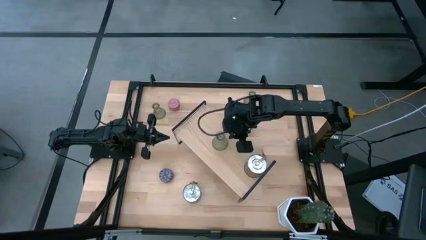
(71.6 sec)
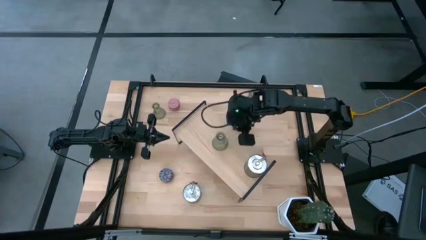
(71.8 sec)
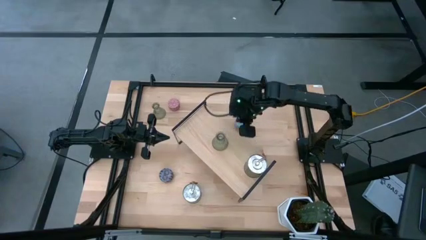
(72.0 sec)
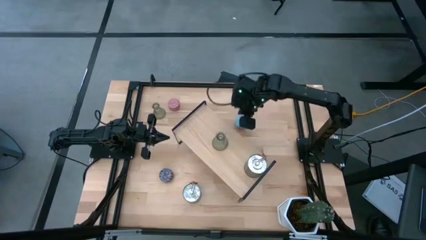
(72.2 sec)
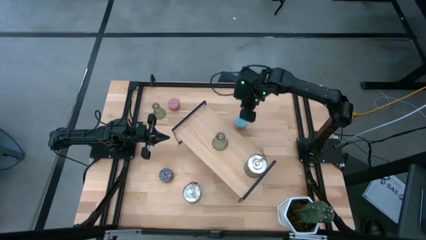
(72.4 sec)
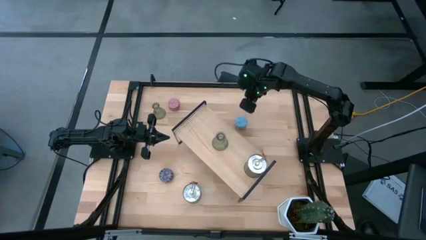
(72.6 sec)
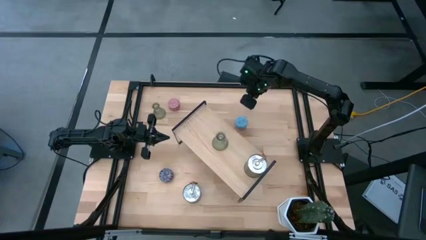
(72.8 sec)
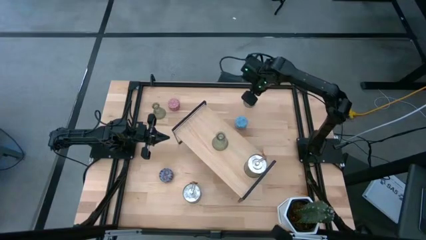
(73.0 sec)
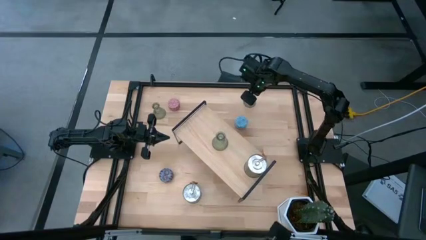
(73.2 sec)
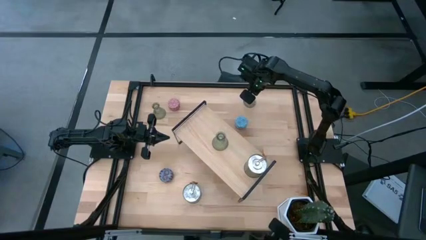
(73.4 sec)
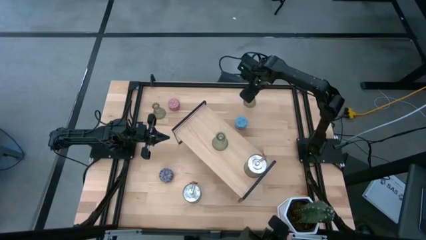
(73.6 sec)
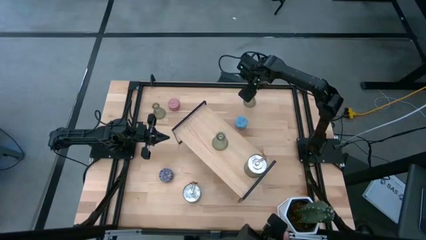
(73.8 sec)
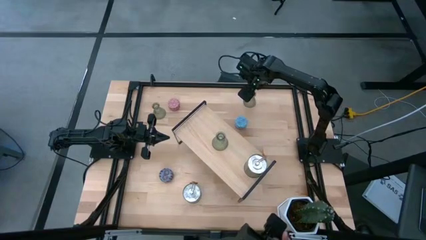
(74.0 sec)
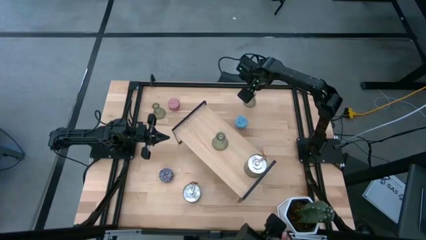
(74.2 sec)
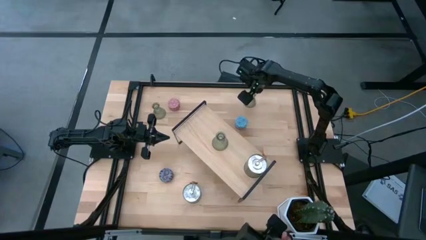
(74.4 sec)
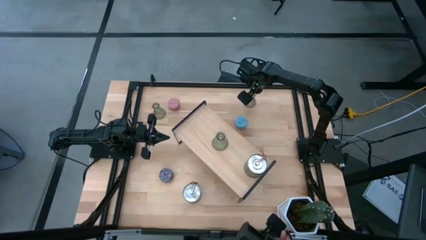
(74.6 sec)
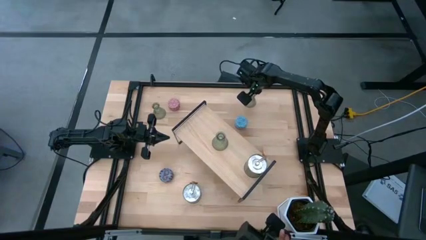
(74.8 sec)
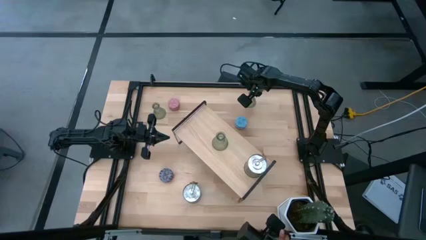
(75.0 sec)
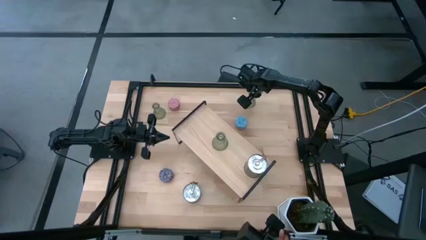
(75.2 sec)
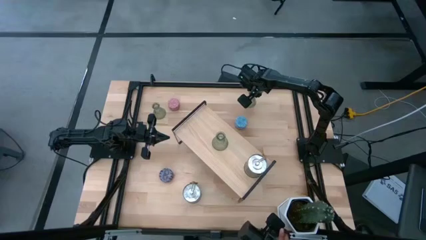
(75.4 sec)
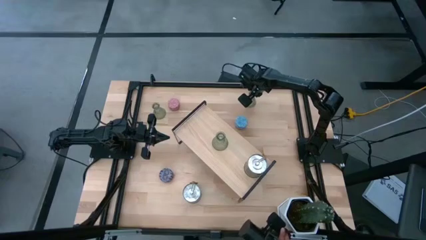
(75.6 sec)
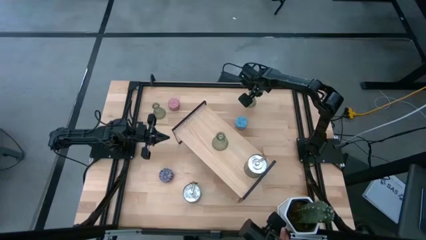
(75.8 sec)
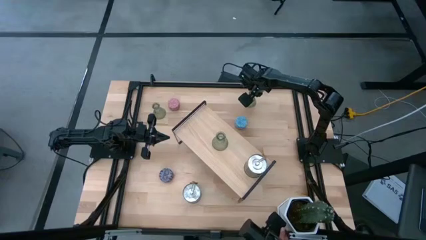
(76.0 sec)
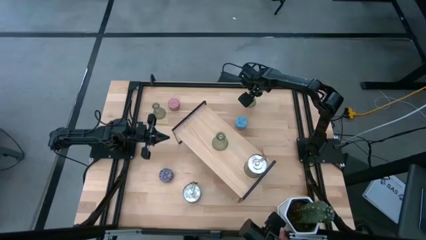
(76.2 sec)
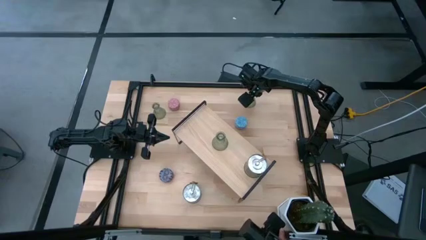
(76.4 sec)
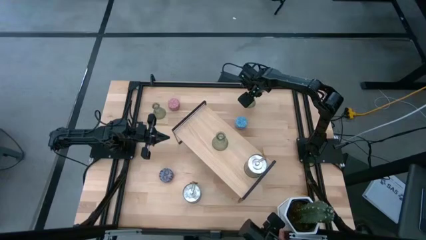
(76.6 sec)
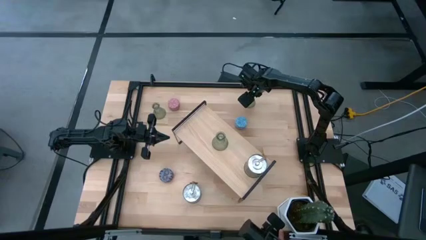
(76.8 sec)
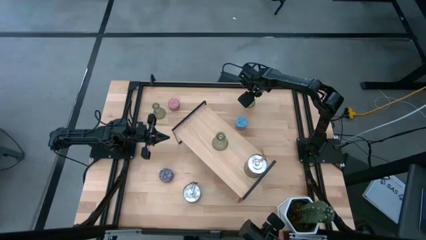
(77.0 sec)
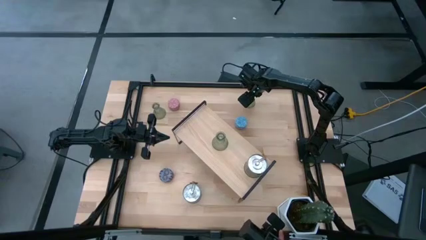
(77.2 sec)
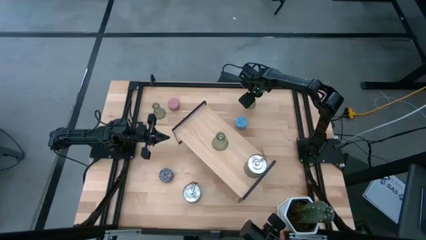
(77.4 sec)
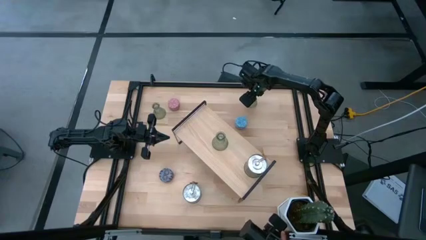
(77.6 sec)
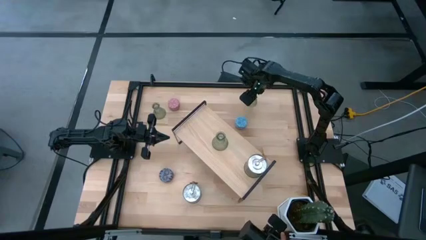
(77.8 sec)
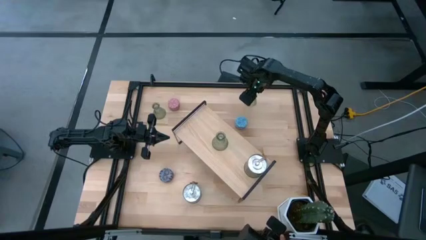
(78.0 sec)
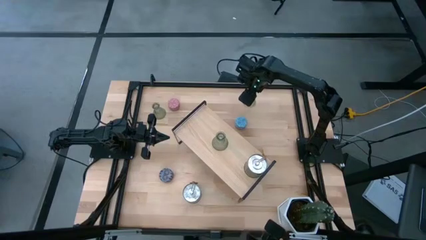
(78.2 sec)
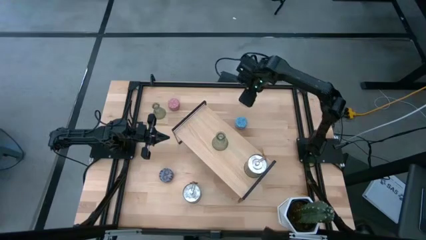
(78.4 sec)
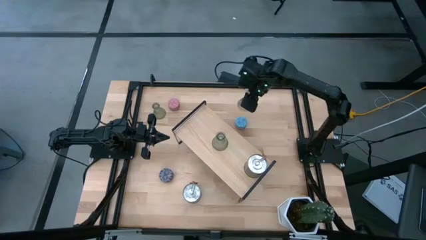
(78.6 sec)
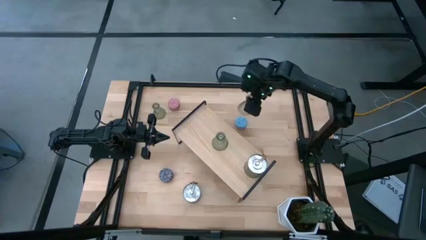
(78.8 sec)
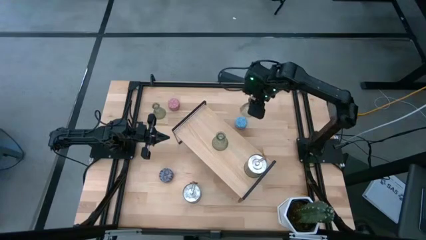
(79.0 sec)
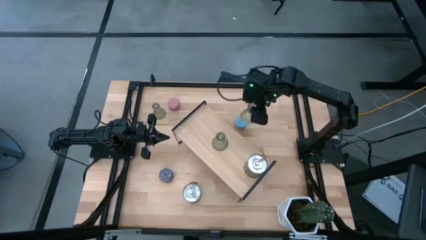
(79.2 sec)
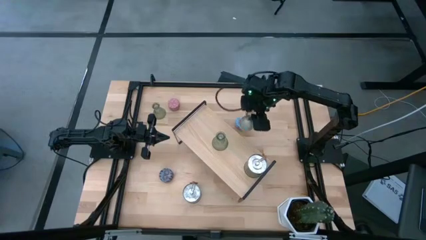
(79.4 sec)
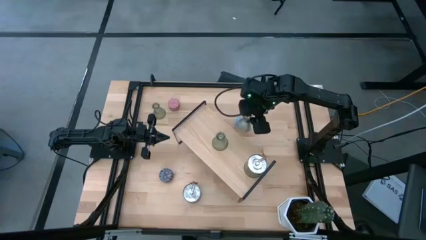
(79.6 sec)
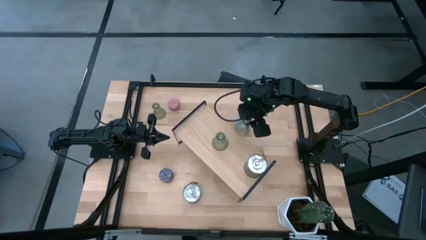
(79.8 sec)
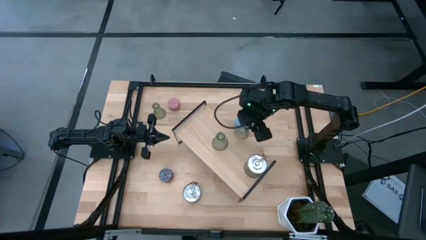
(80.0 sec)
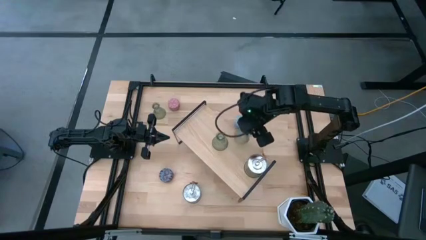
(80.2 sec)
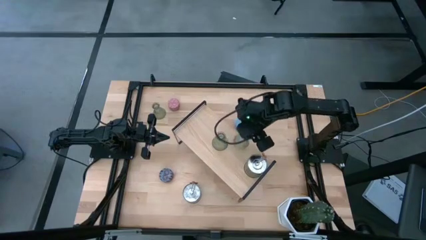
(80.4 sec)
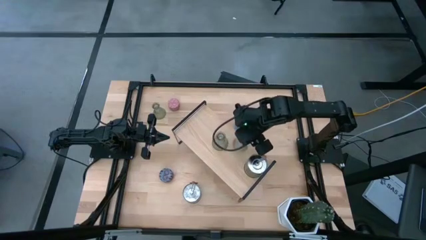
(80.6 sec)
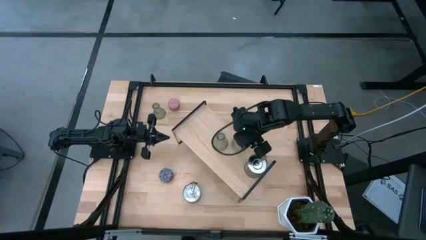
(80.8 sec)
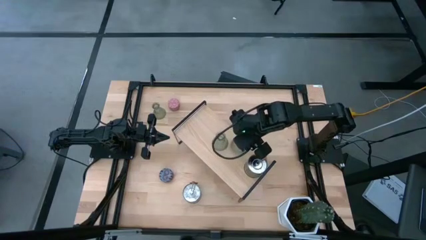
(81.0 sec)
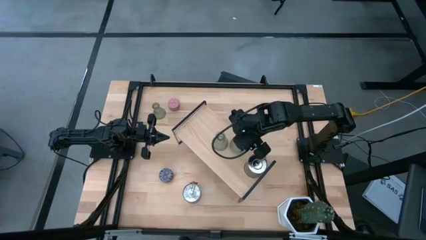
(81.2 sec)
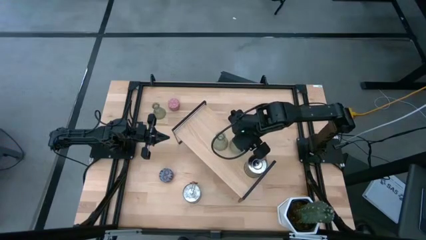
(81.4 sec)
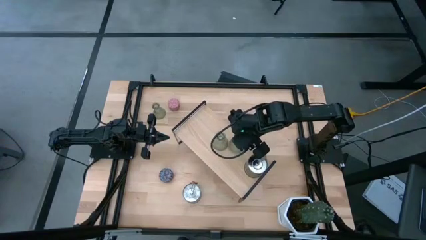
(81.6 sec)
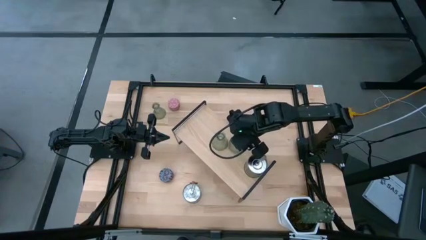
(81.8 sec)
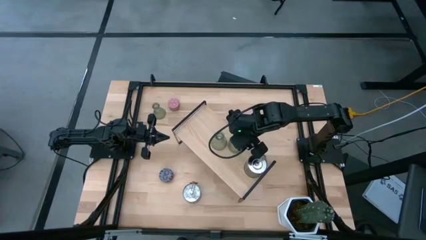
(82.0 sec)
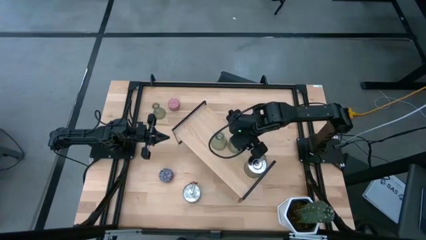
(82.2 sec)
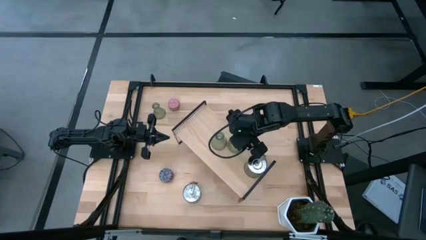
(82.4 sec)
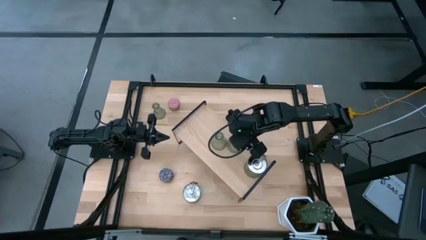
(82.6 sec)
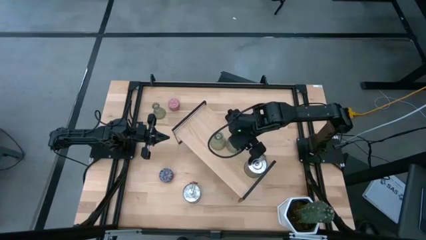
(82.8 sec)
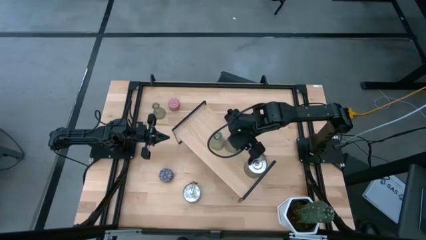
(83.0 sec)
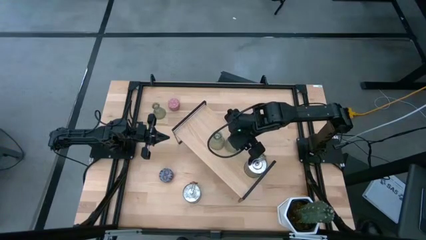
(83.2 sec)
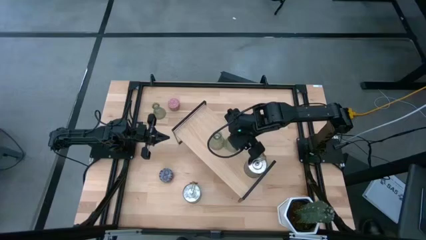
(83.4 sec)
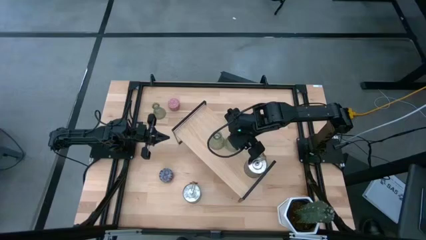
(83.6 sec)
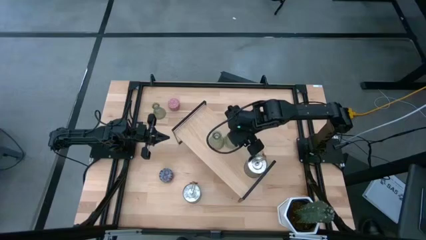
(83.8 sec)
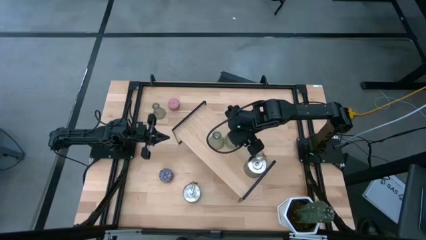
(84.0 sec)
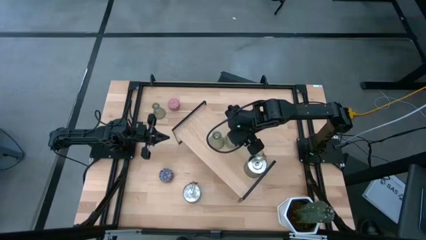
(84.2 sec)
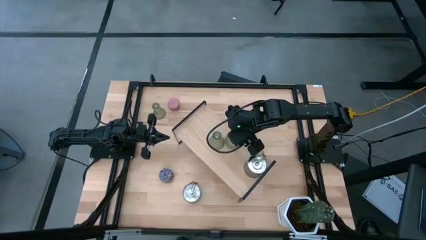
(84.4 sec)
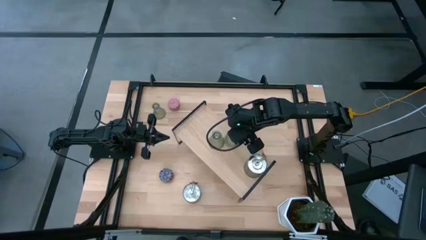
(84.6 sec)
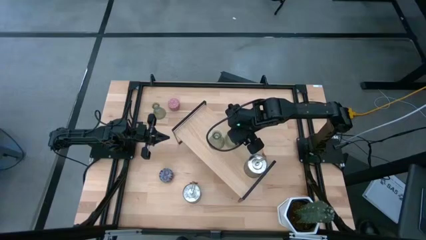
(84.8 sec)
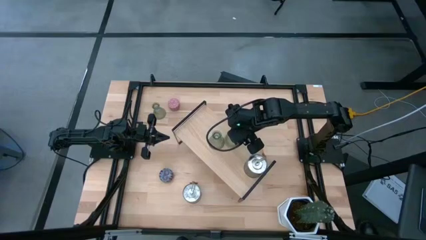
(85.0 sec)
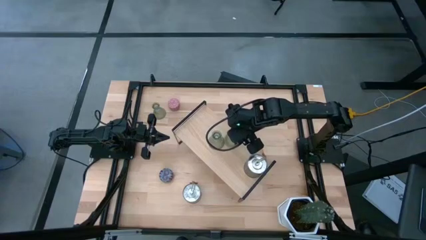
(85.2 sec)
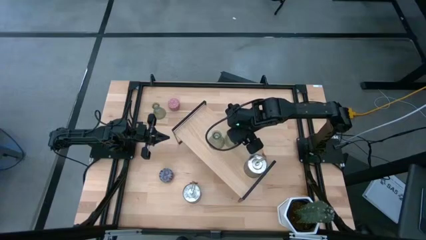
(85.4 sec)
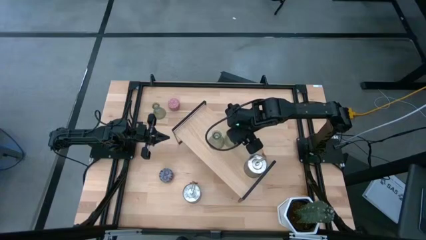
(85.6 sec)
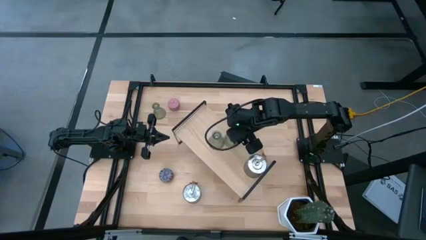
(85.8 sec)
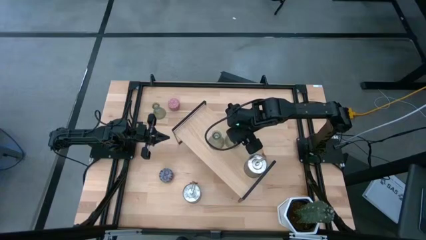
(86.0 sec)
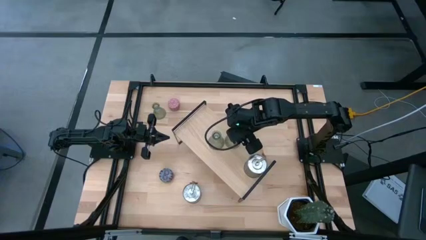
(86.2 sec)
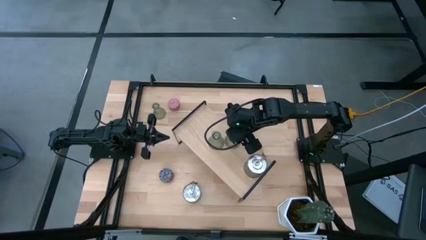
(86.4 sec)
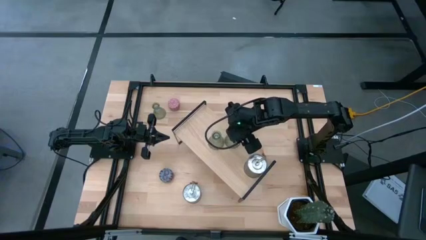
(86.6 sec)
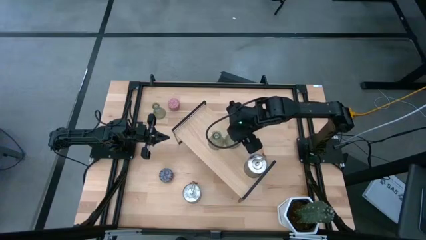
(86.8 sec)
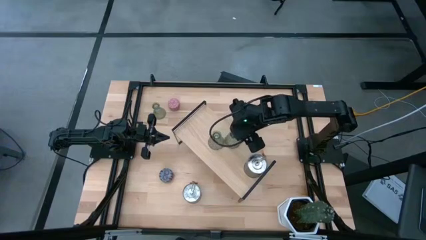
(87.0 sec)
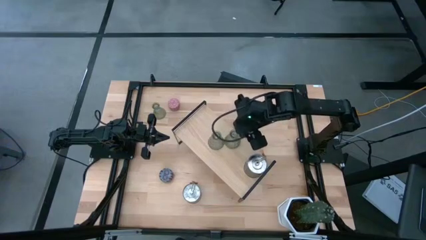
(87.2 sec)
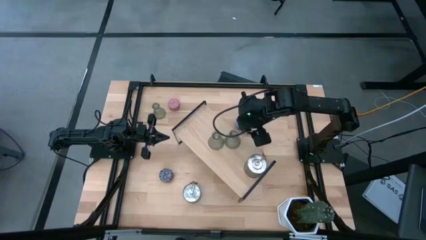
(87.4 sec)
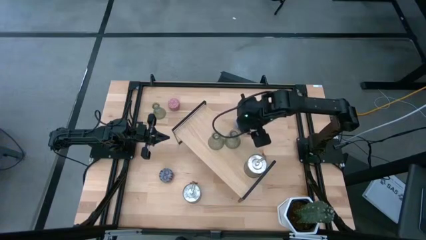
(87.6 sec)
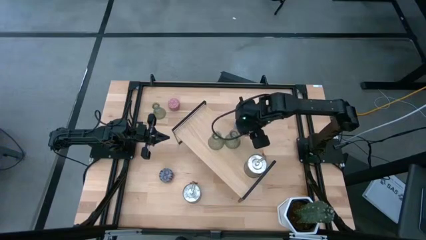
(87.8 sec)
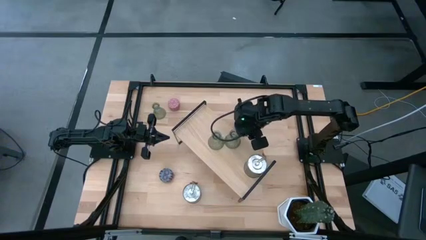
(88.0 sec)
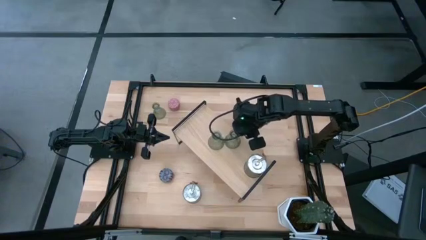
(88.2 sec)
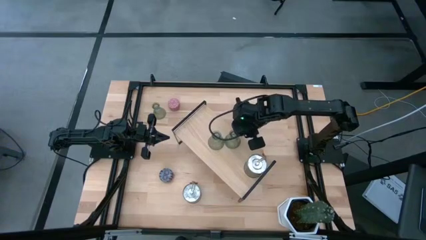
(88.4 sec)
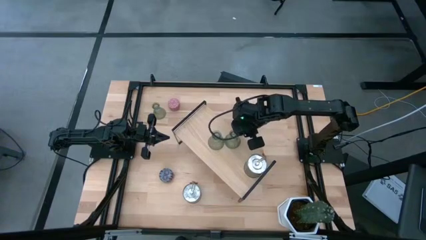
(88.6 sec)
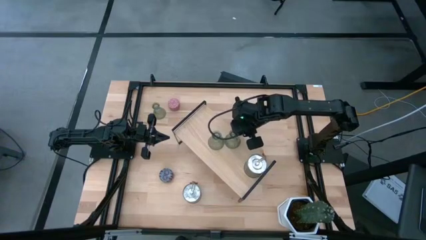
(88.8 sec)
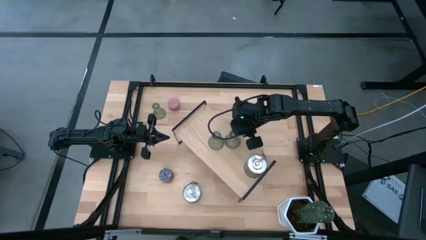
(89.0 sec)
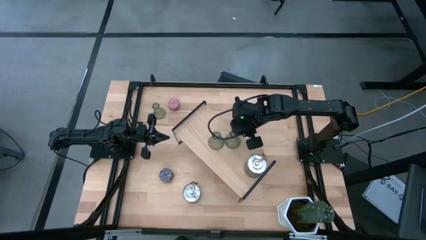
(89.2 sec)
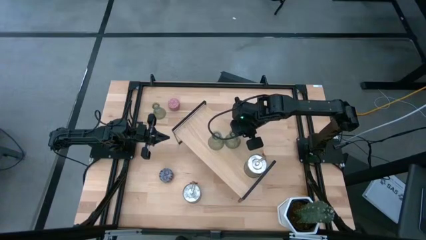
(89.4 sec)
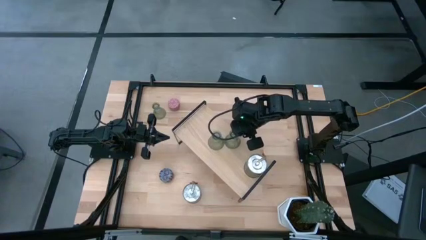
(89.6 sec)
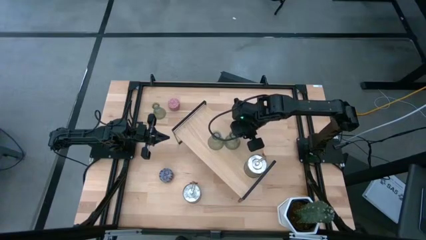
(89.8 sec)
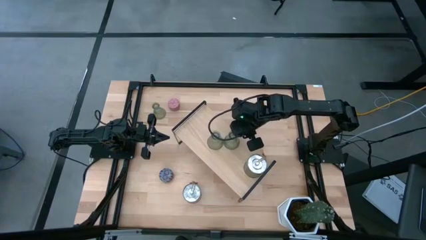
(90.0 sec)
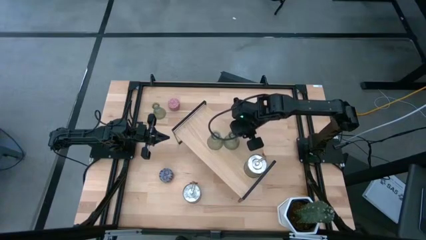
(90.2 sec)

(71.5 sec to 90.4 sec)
Task: Pick & Place candle stick holders
Put the right transparent candle holder on the shelf
